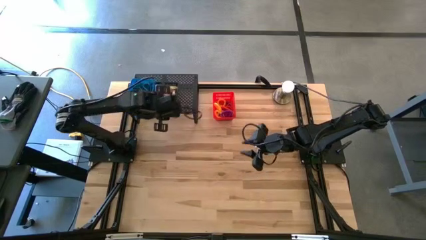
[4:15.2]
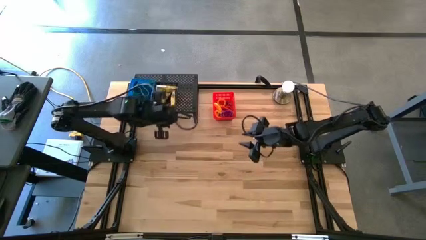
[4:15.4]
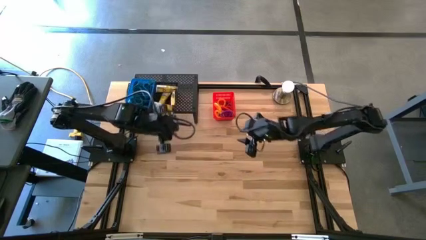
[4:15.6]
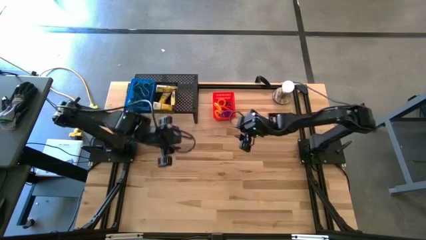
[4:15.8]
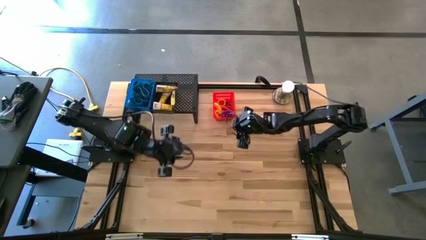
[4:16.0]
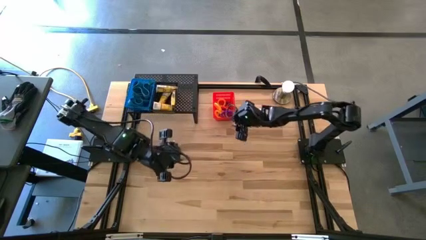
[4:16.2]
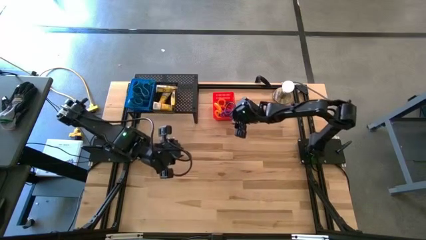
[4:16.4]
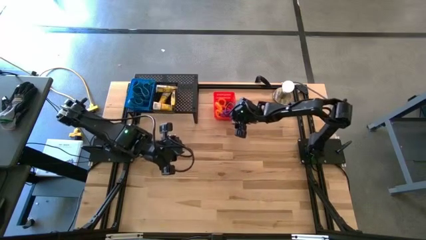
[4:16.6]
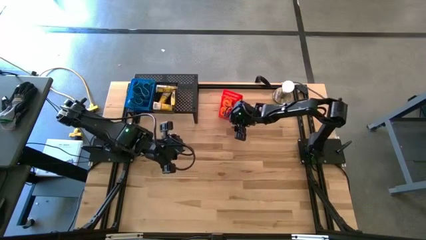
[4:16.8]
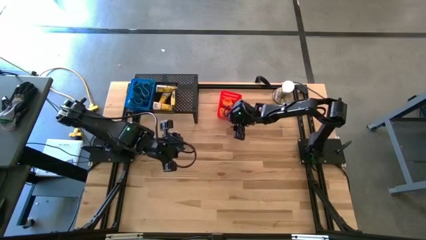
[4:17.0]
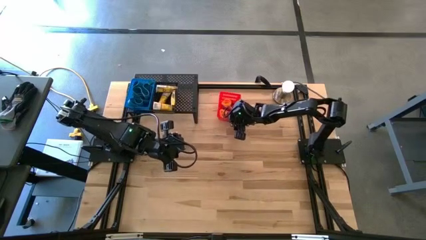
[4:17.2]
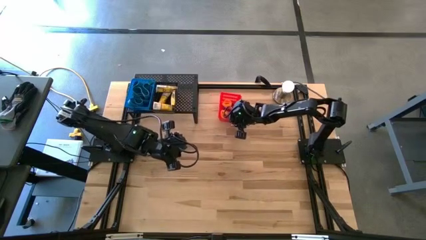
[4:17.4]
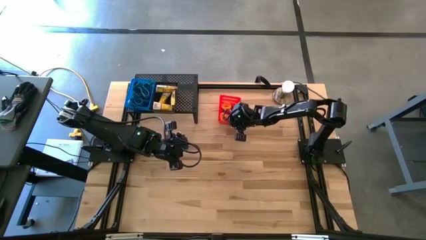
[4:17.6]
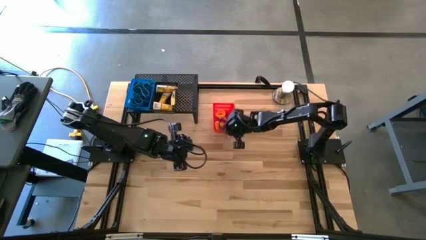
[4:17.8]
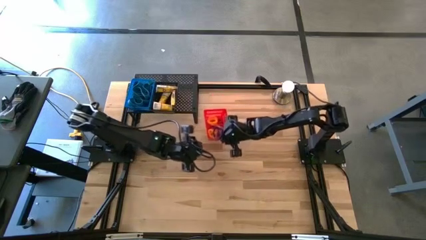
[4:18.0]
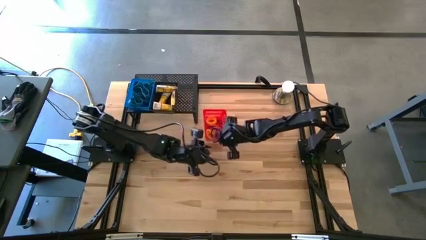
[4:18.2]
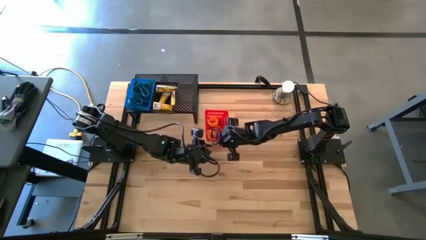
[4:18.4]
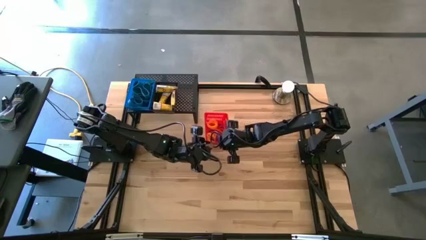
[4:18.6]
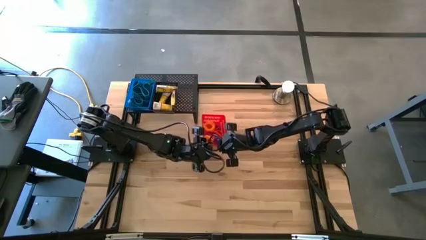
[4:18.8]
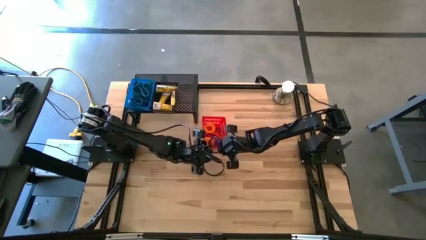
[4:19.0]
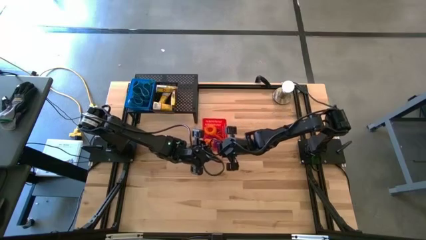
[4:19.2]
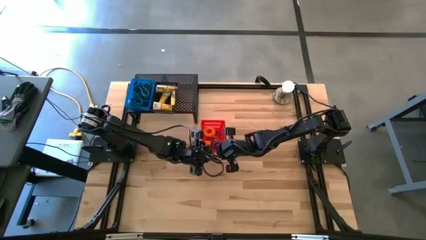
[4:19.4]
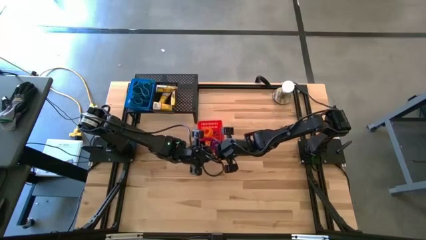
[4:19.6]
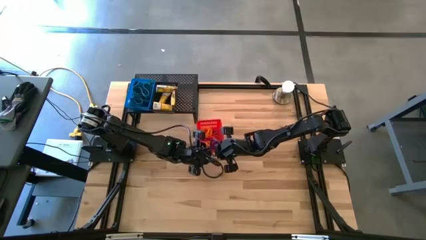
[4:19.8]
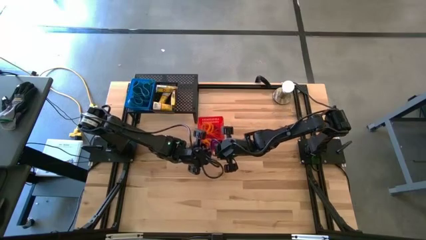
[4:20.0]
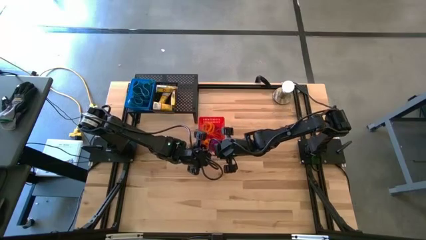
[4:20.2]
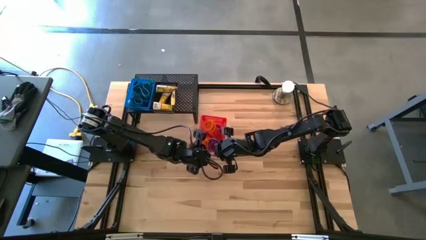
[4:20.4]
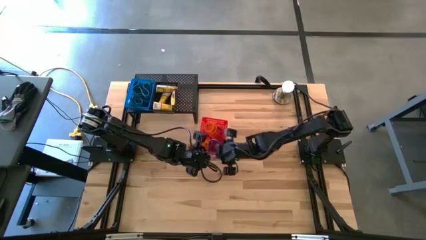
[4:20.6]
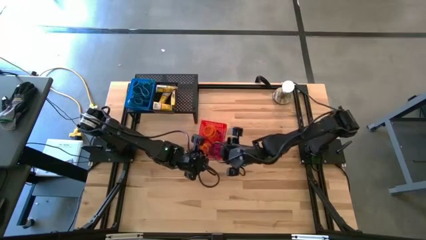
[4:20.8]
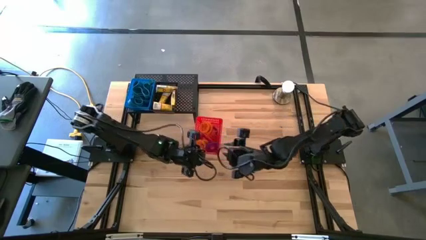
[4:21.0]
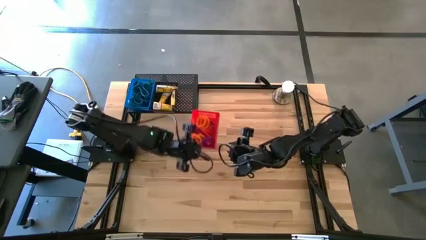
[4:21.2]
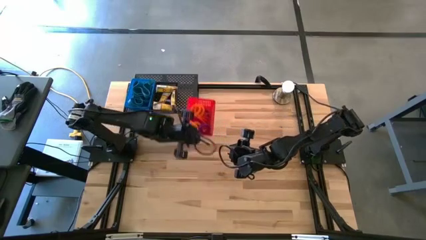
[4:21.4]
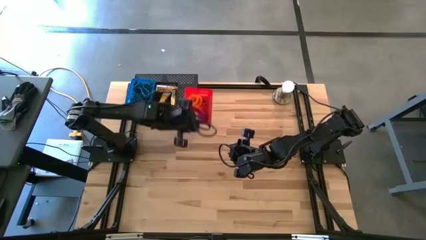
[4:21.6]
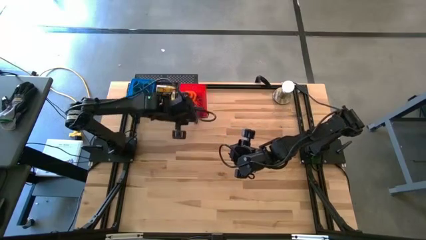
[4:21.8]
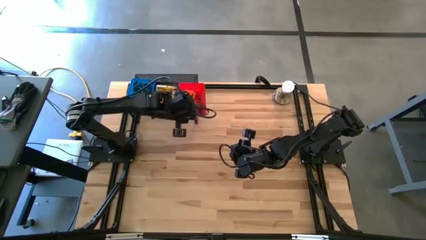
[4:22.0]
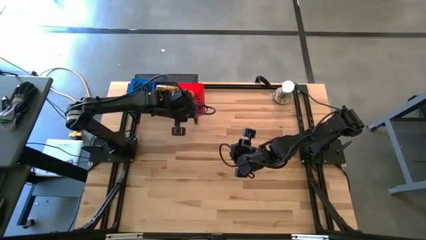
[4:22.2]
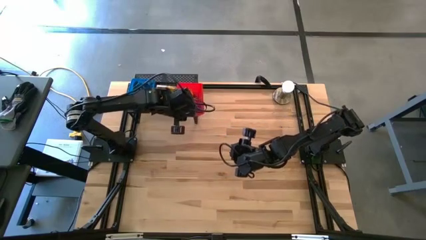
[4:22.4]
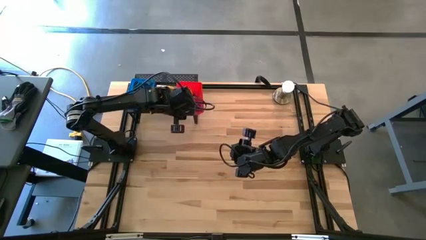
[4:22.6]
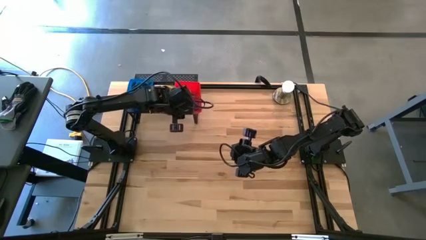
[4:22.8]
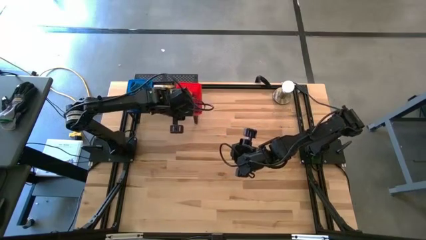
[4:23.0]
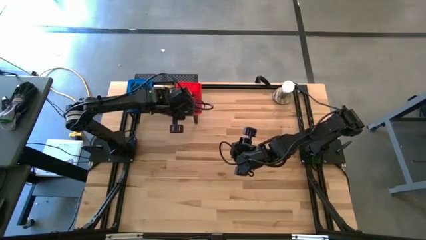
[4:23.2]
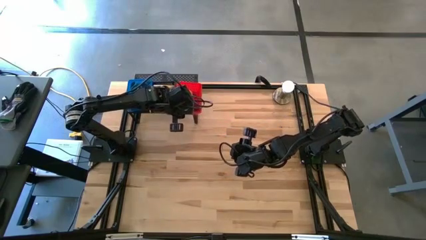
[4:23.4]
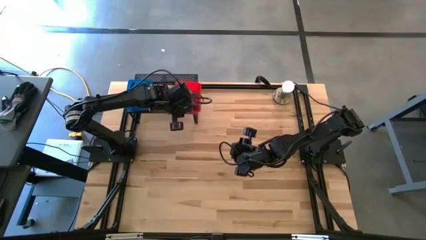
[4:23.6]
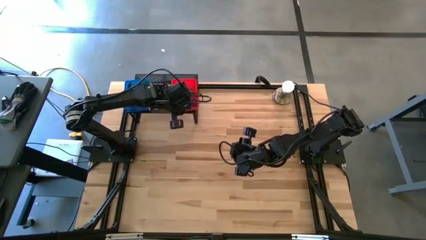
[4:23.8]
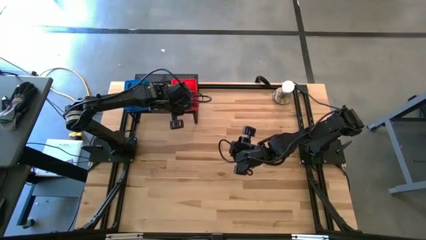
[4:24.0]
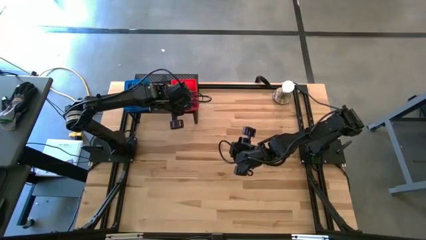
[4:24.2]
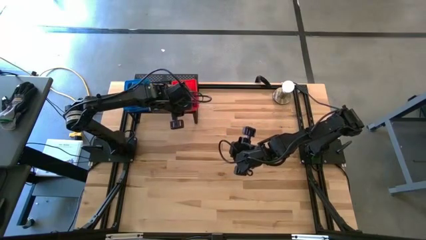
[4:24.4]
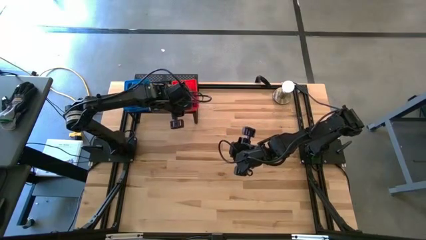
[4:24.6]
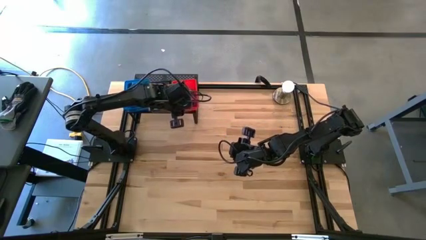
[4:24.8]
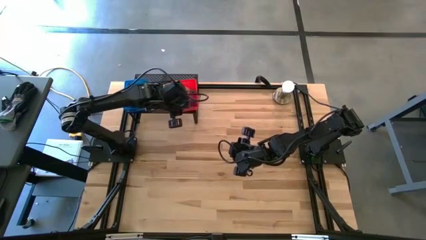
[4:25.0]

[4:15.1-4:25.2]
Task: Pick & Place Office Desk Supplies
Put the red bin containing the spring keychains on the shelf

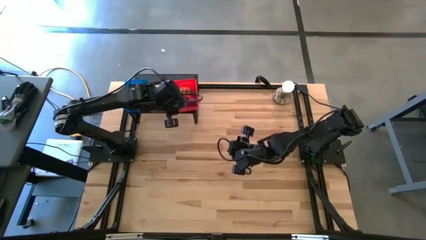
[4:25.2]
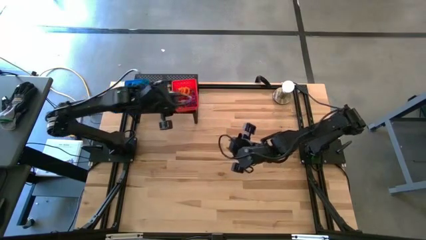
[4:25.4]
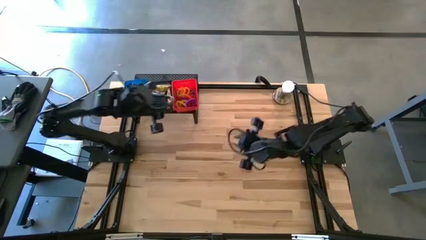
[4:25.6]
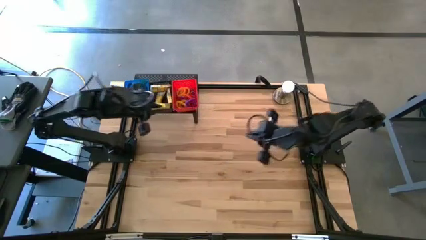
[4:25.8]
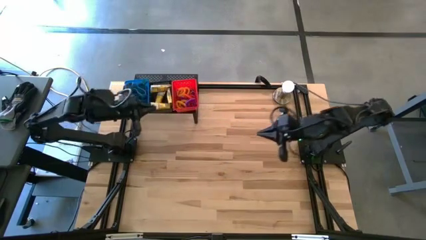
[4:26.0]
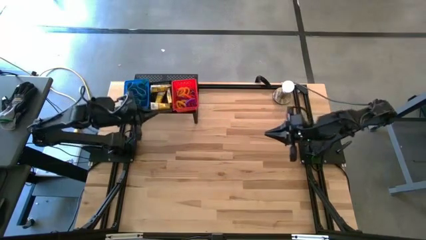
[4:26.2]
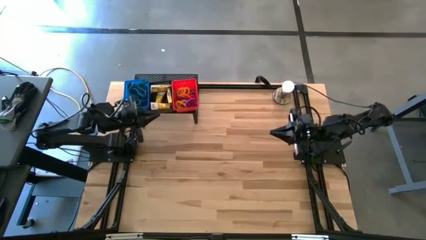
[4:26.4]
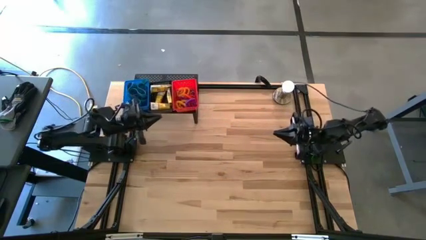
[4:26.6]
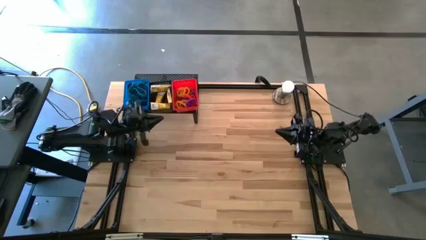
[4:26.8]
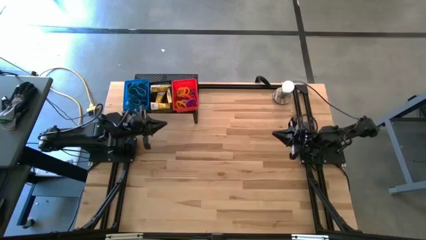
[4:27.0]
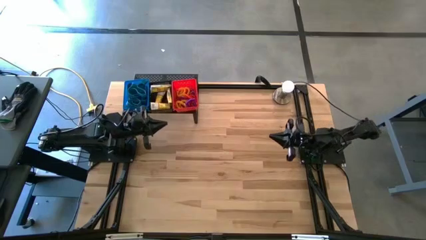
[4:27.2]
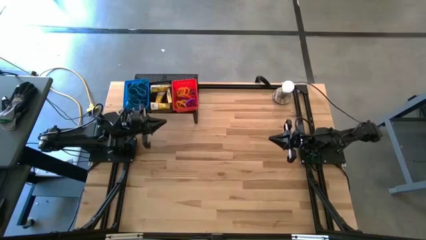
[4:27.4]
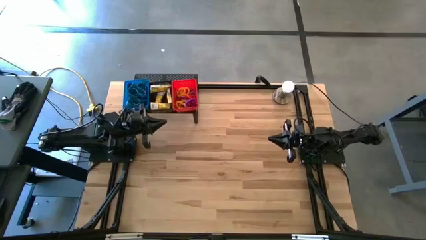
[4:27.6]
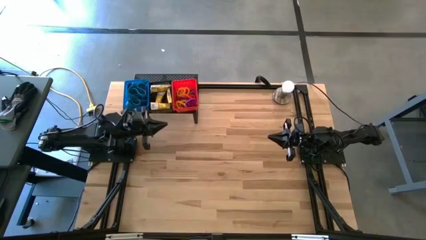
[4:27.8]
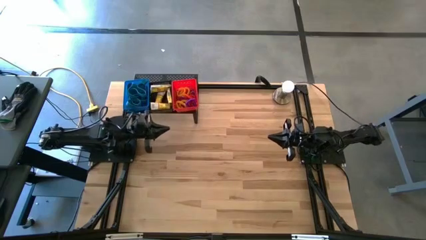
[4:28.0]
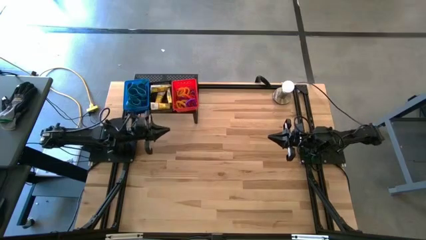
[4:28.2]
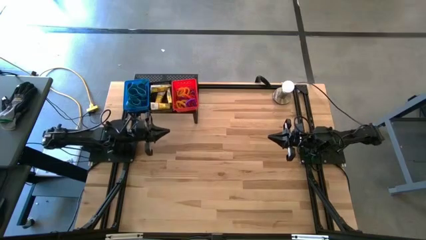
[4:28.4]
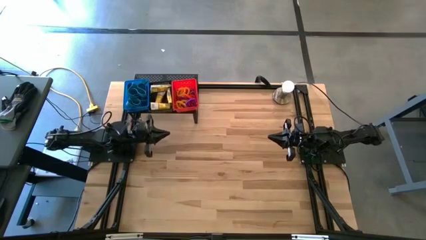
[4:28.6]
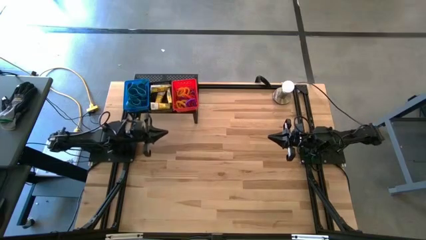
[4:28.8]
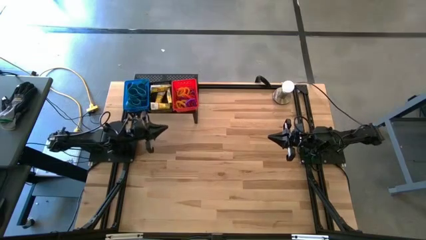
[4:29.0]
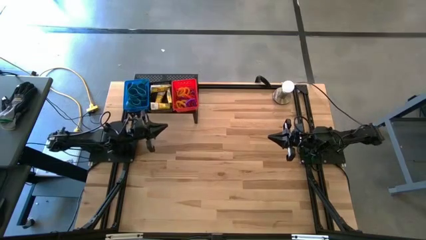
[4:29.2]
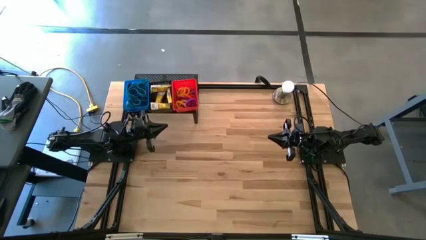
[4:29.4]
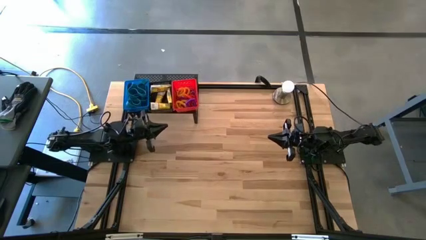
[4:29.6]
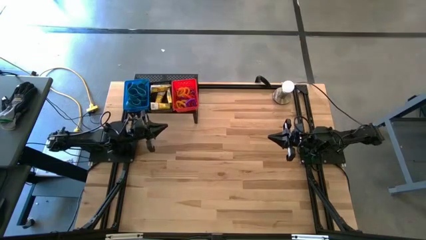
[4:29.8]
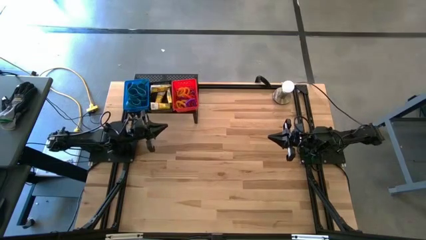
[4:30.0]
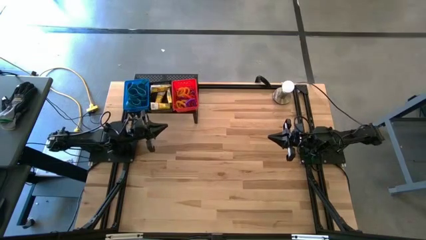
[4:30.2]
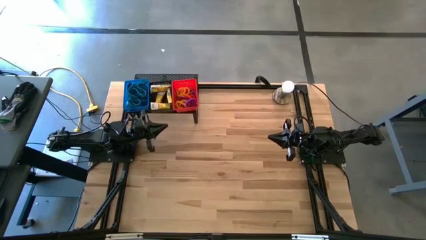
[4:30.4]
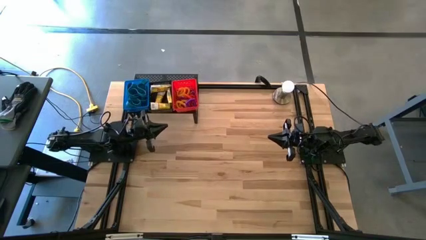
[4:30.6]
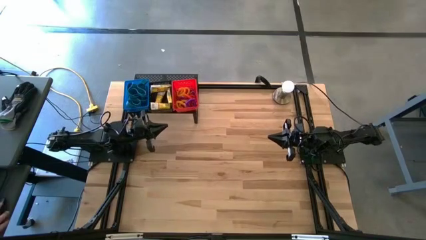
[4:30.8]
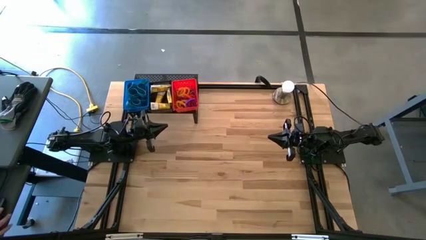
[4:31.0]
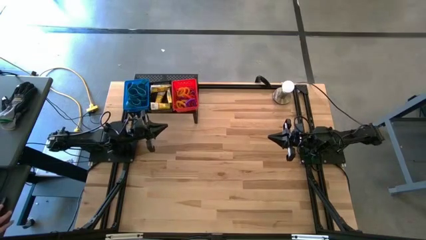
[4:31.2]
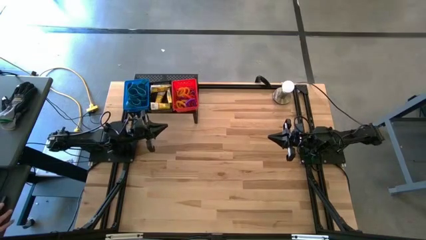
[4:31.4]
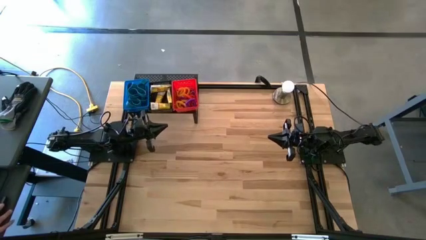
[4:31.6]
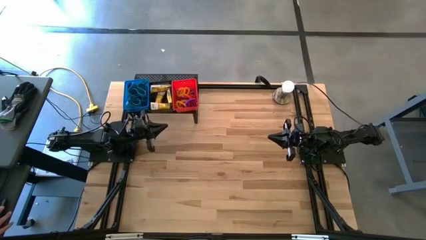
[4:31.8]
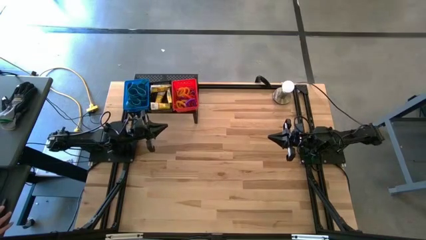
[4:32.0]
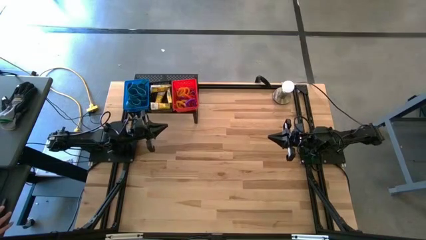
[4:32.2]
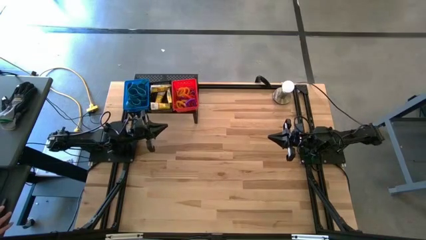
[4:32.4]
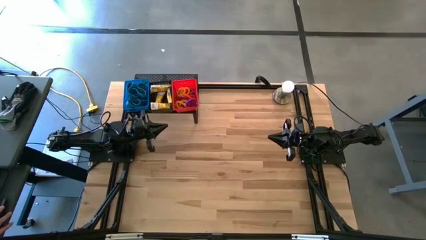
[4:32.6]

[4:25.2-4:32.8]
Return to Home Position
